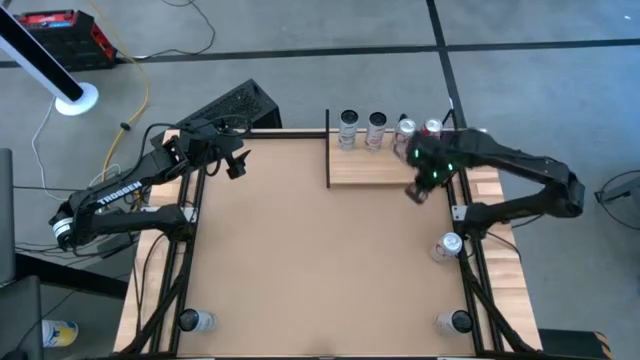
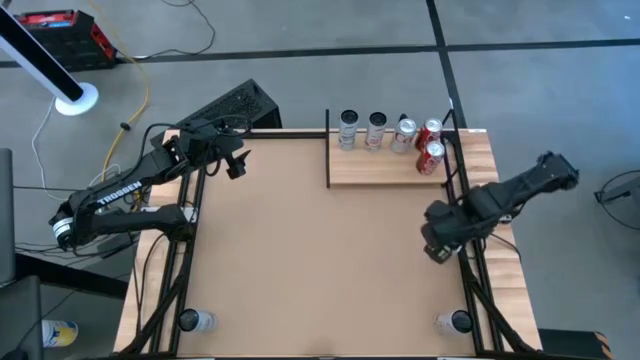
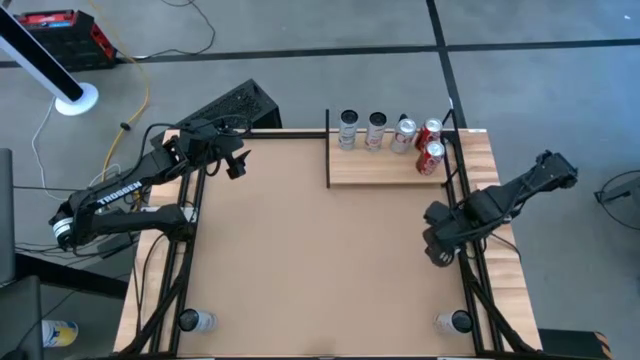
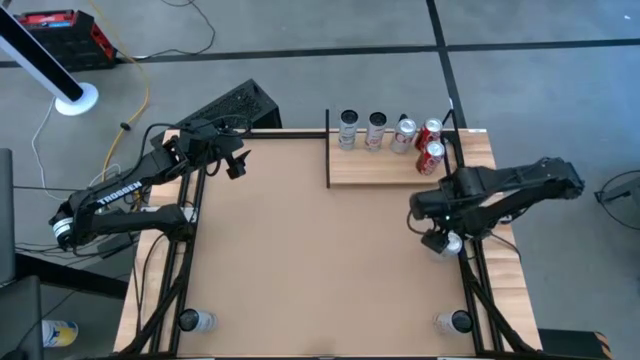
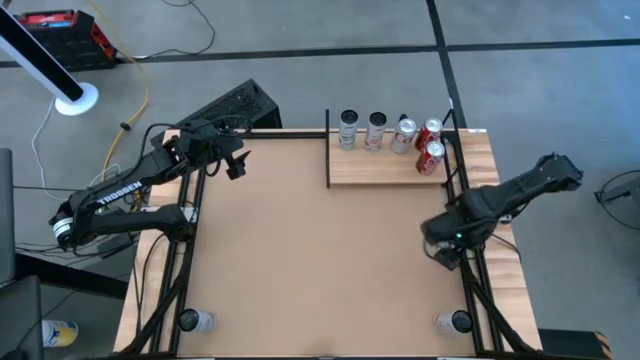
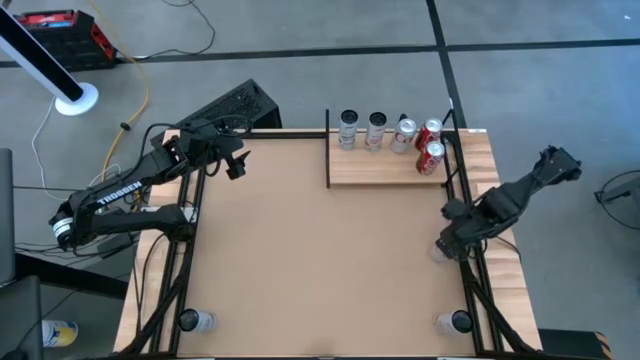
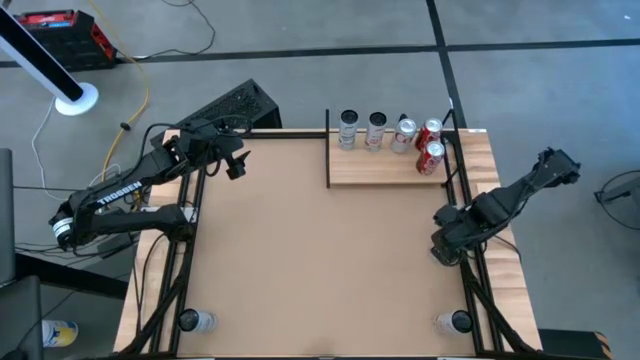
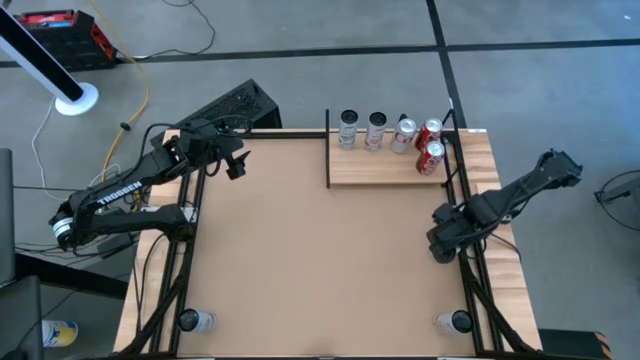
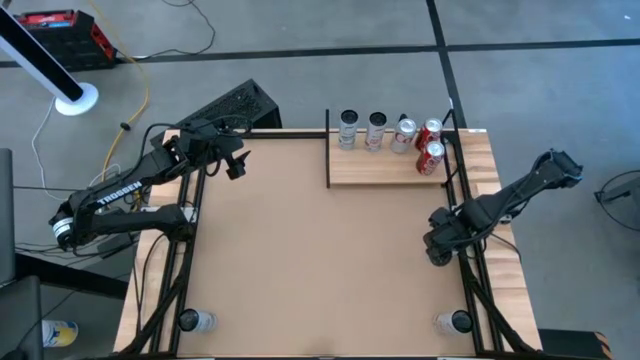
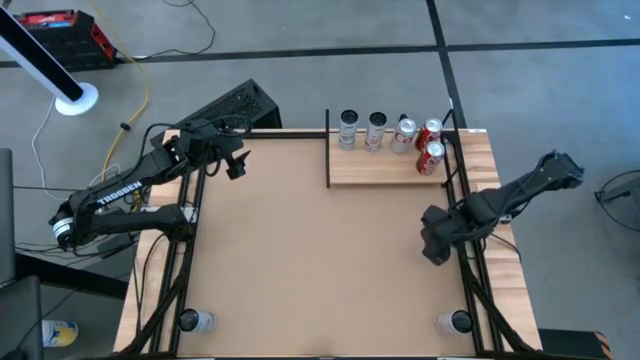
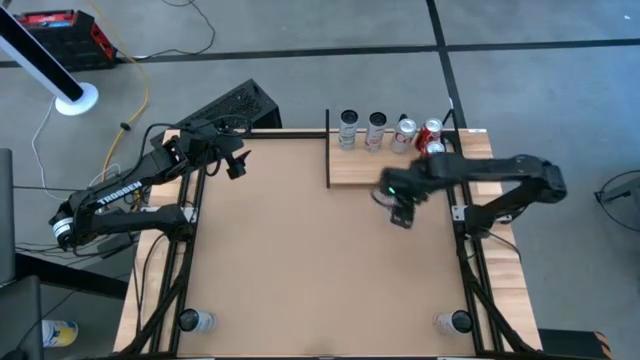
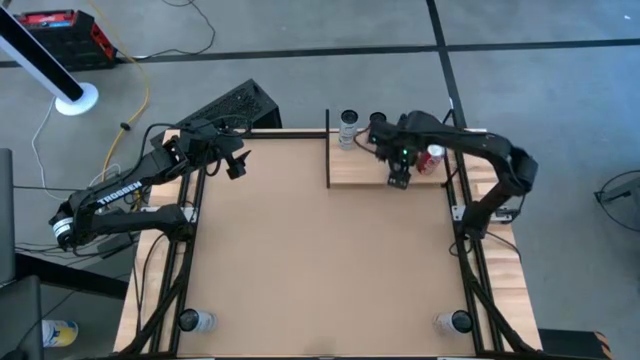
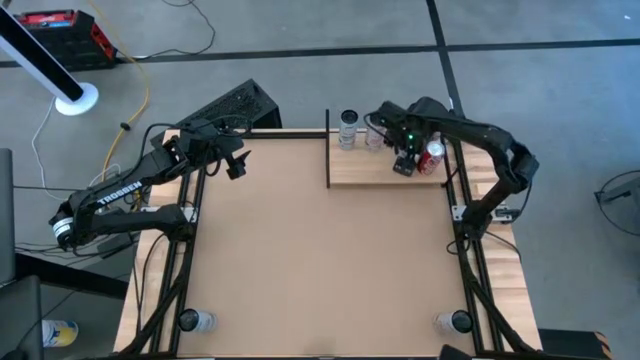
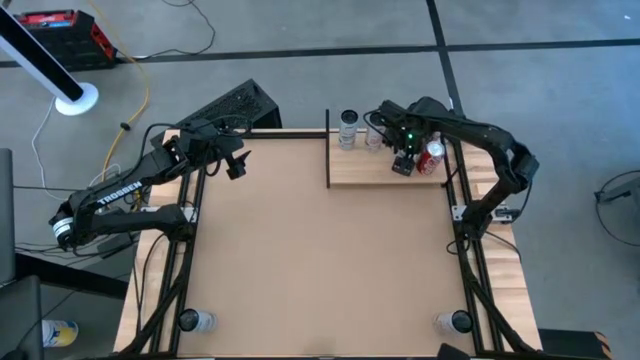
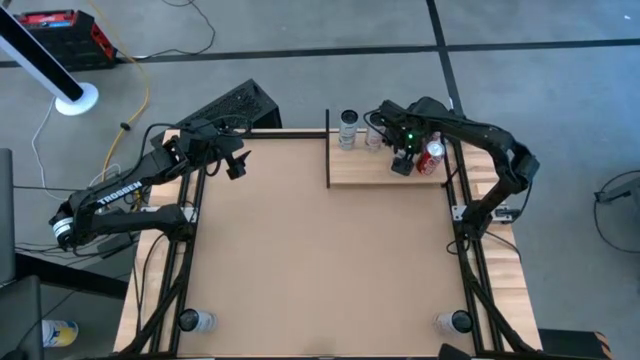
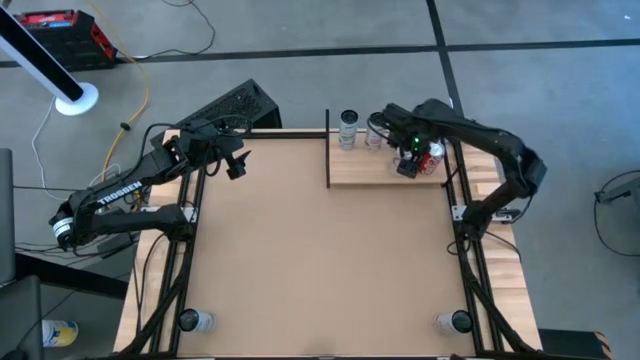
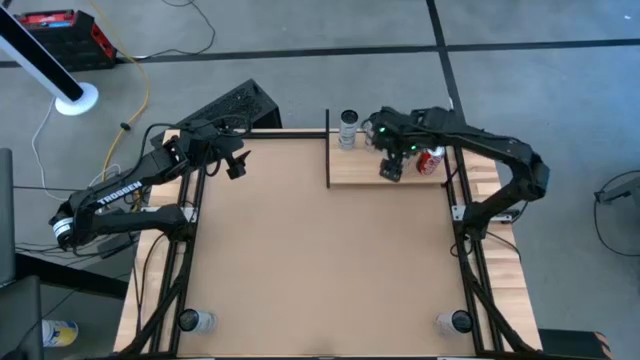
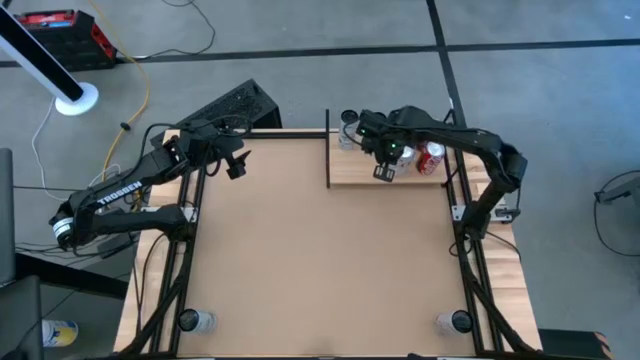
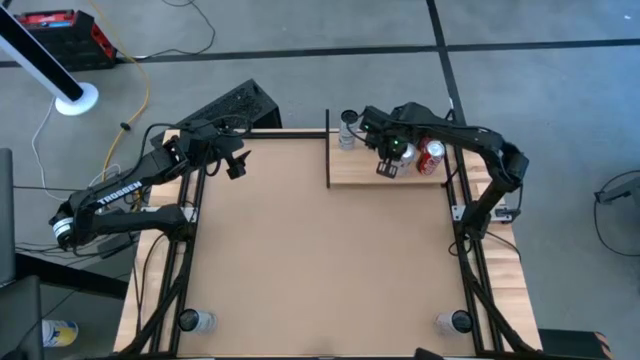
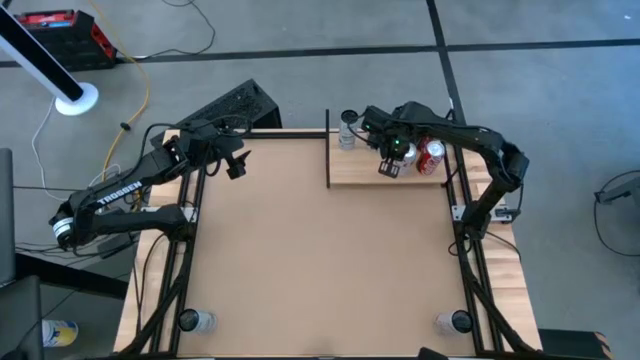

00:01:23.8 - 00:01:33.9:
Task: Place canned beverage on shelf
Put the red and silver soda can on the shelf and align it with the other red and silver soda can

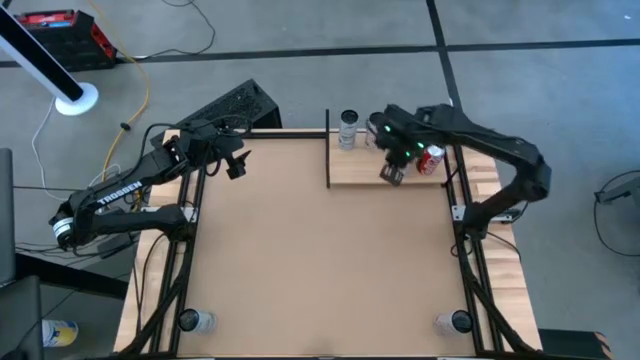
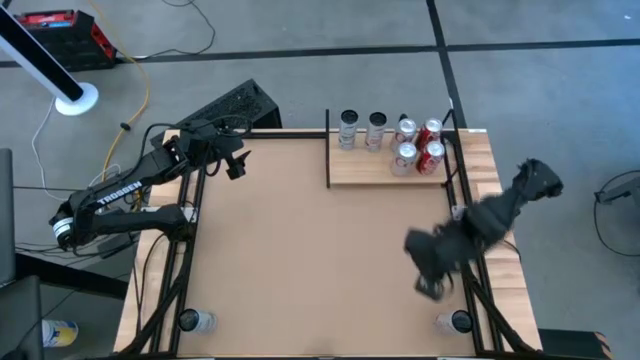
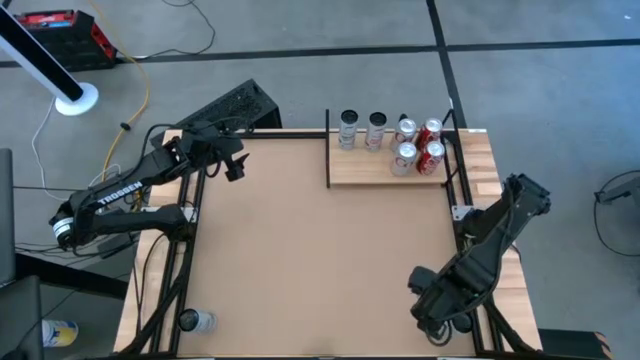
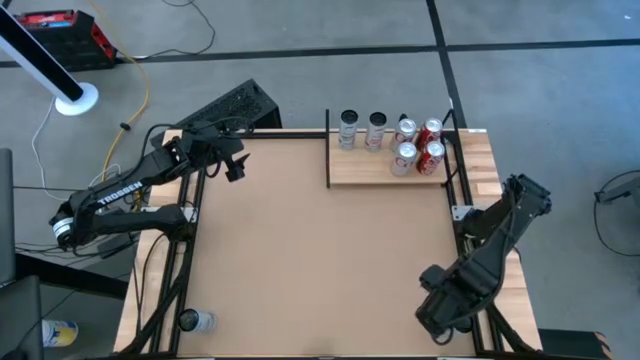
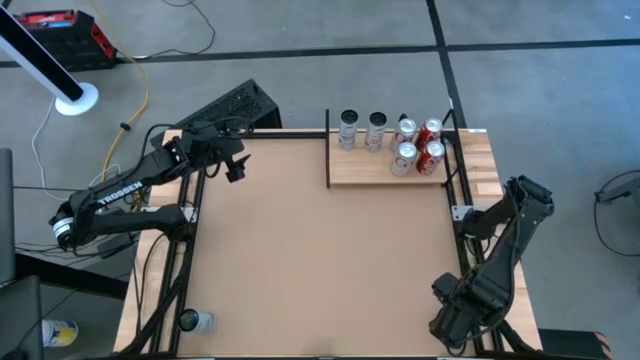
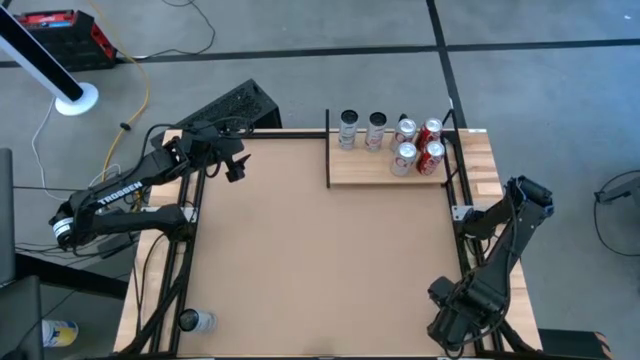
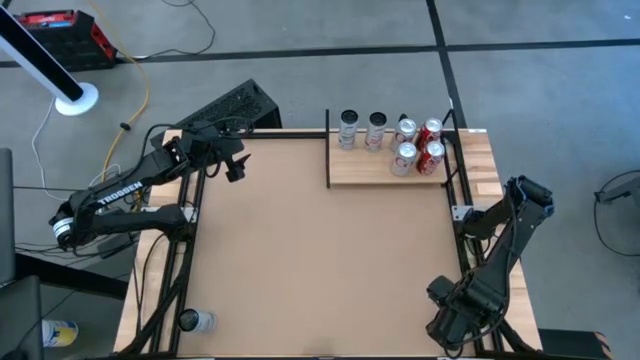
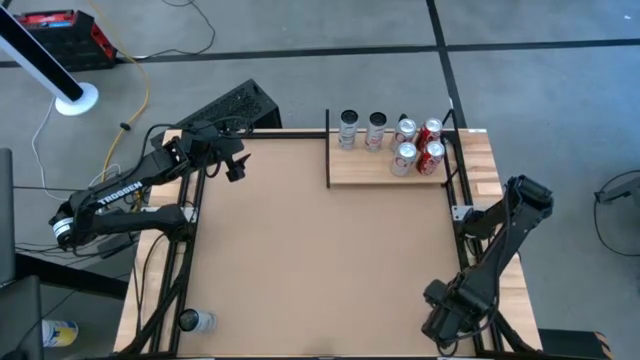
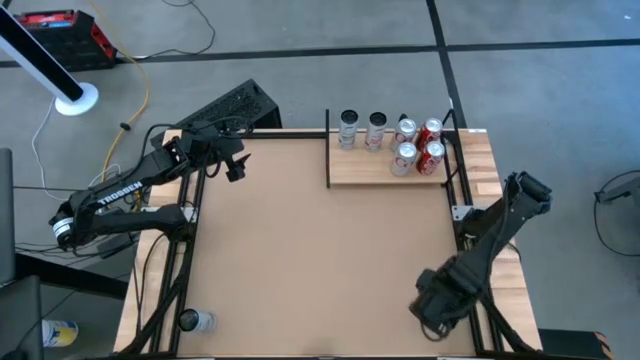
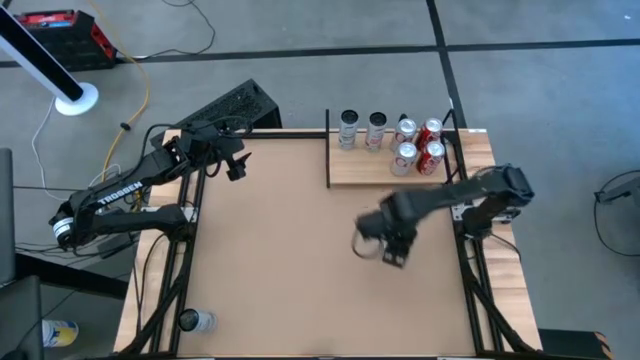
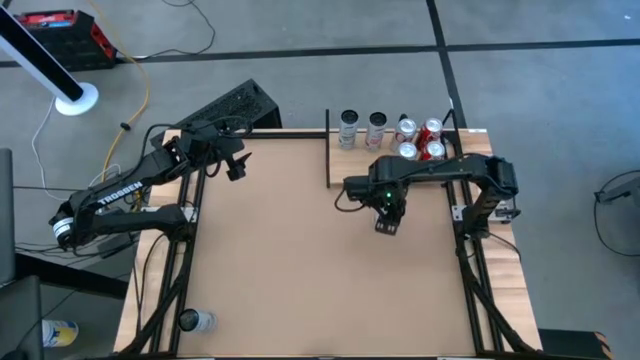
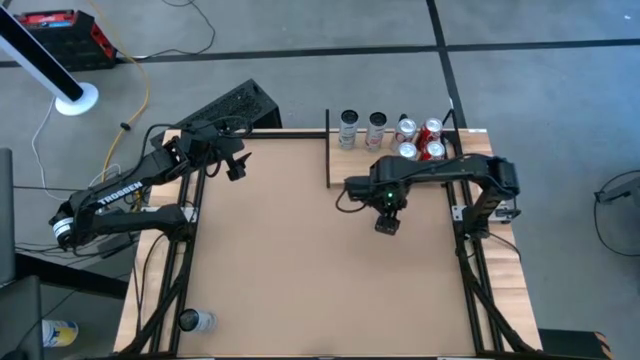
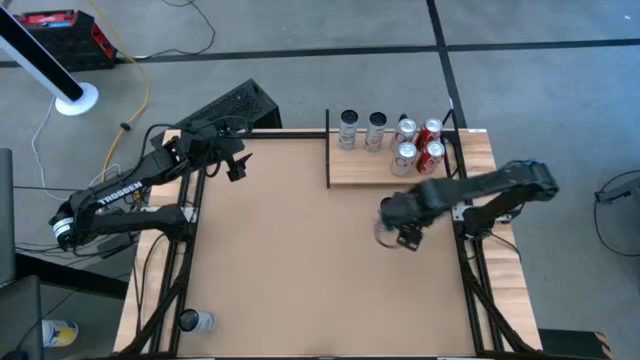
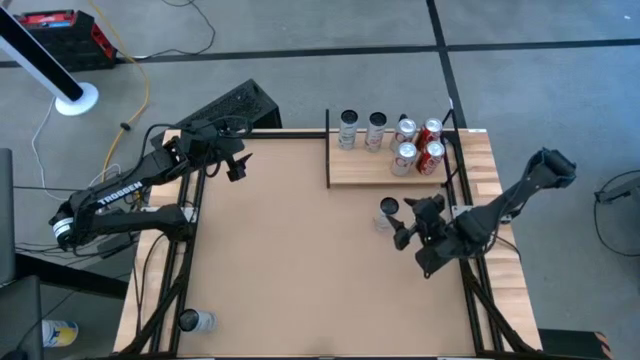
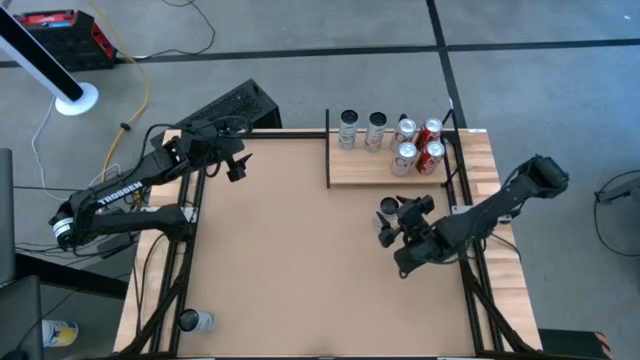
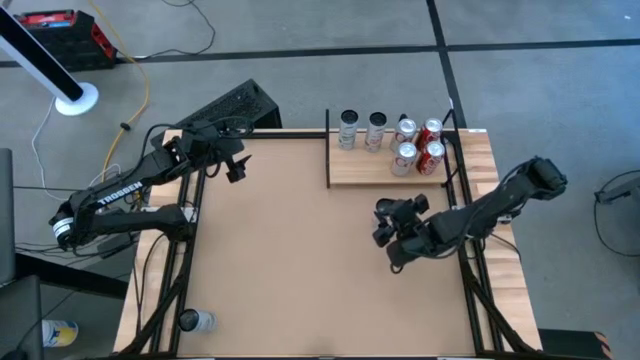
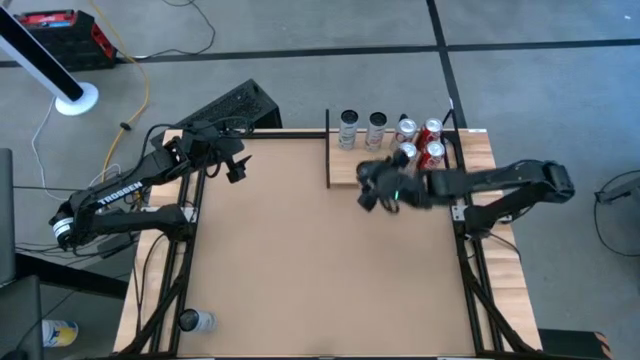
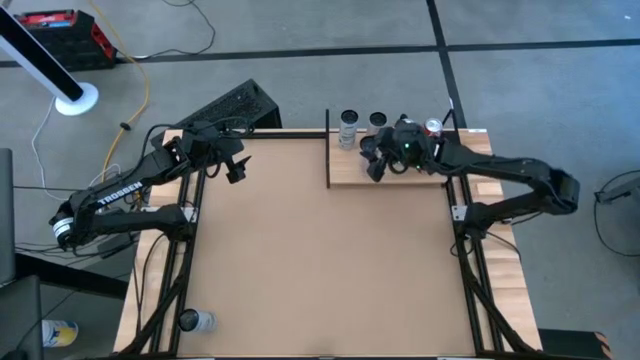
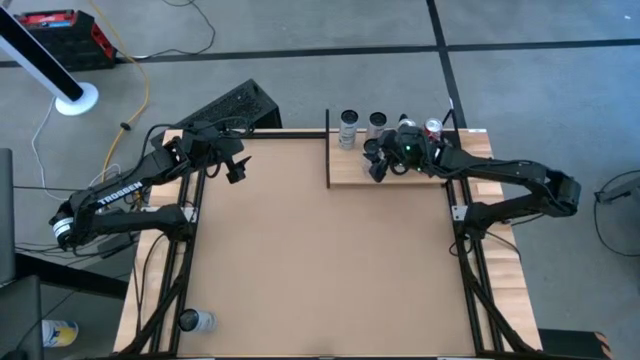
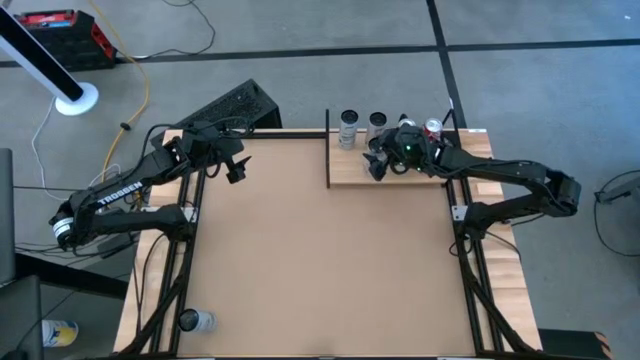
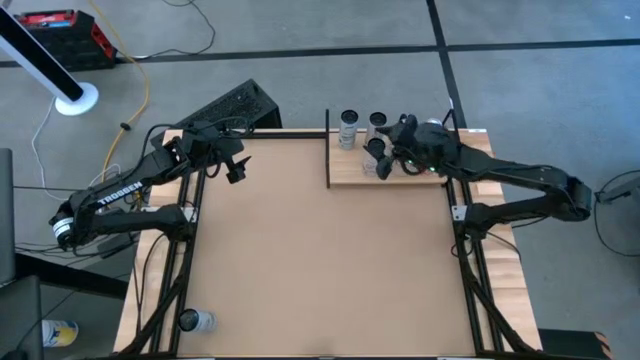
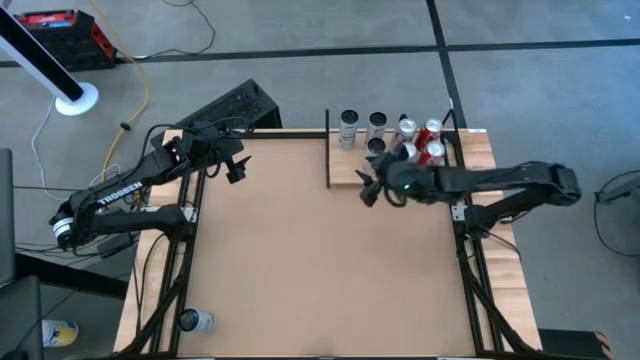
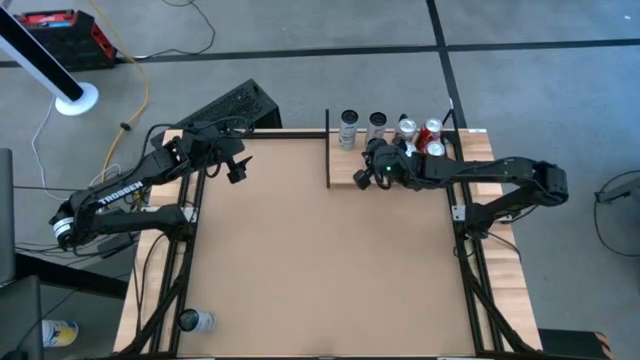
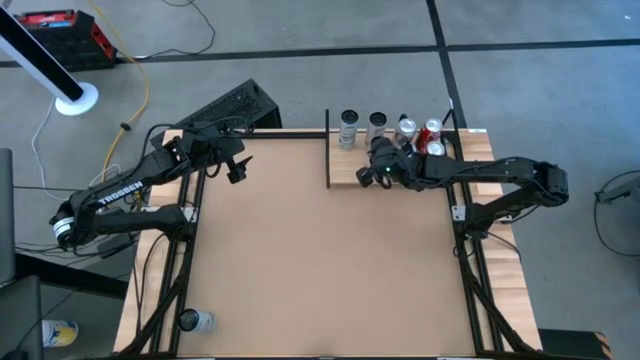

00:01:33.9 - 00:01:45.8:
Put the white and pink soda can on the shelf and align it with the other white and pink soda can
